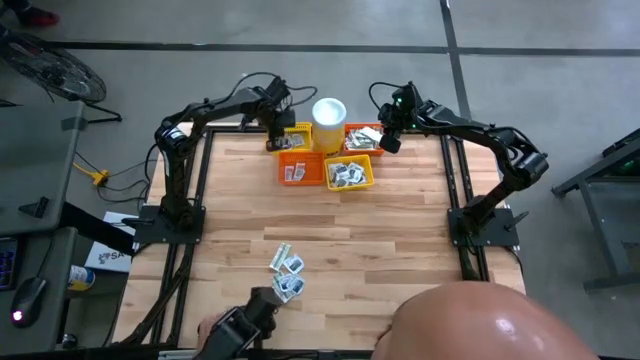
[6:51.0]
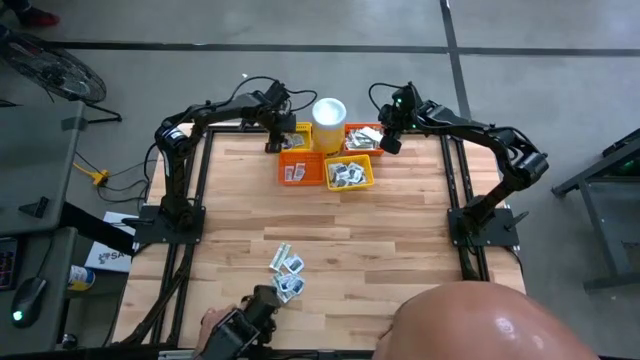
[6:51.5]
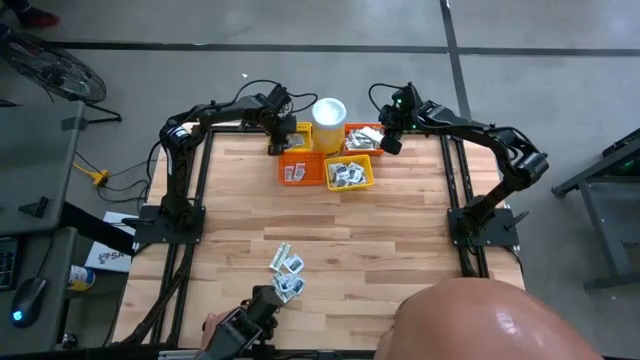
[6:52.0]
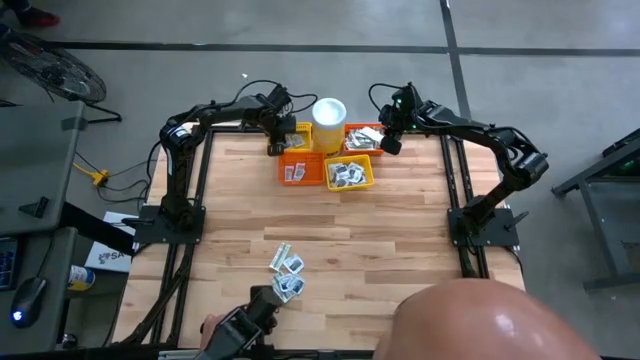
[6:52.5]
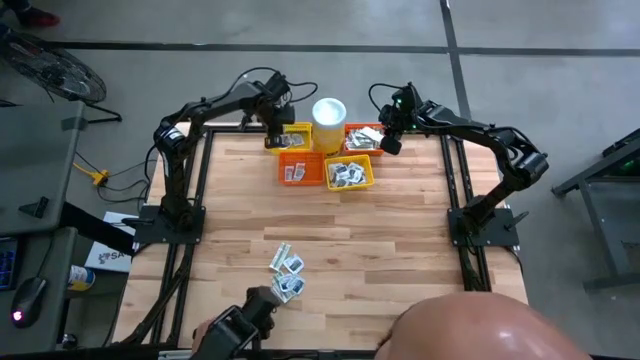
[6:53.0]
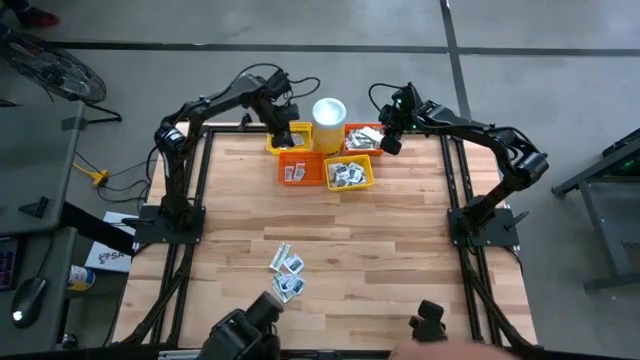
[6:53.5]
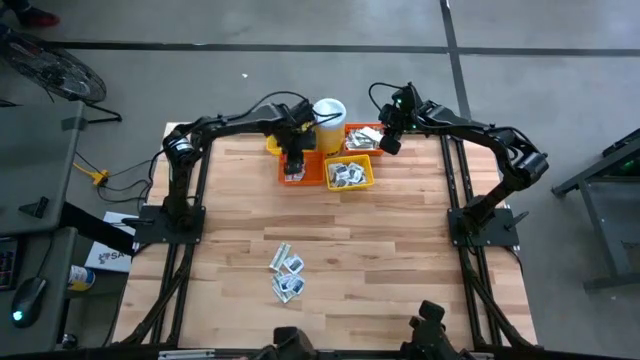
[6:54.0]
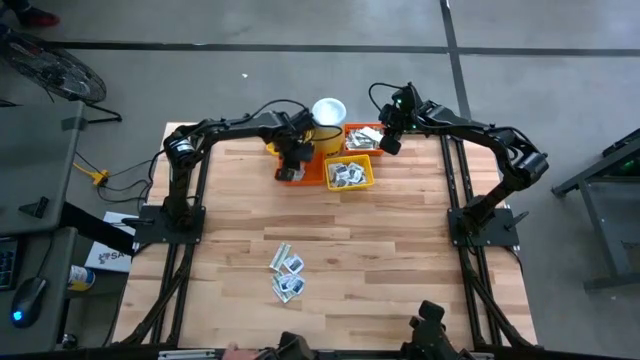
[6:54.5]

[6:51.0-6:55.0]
Task: Pick & Place First Aid Supplies
Put the orange ointment pack into the bottom orange basket

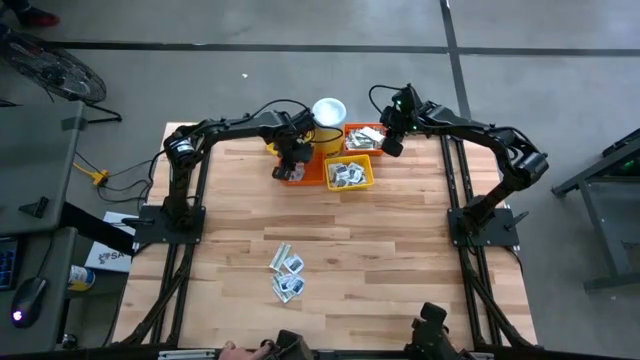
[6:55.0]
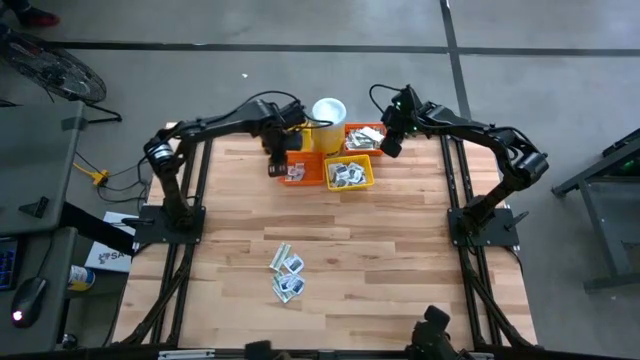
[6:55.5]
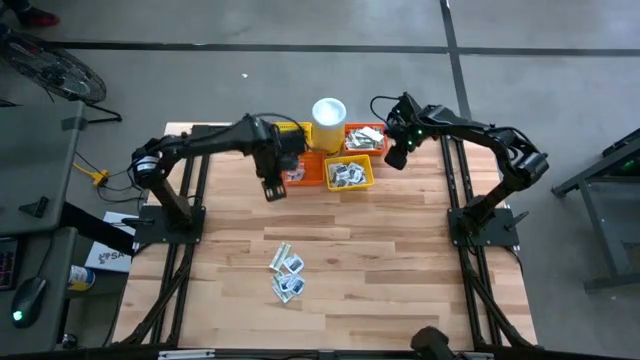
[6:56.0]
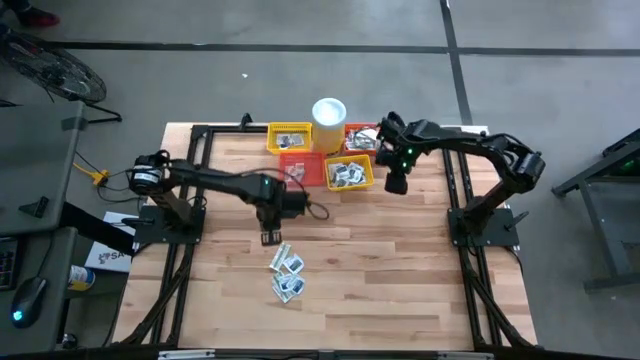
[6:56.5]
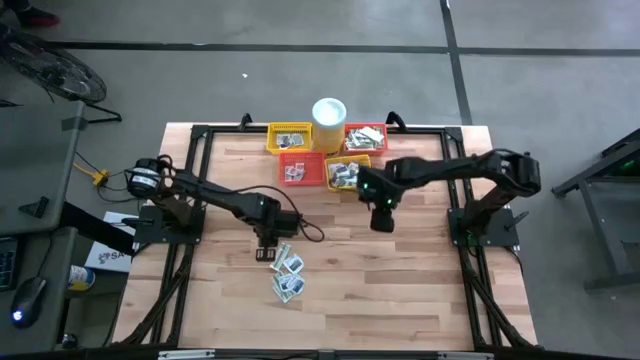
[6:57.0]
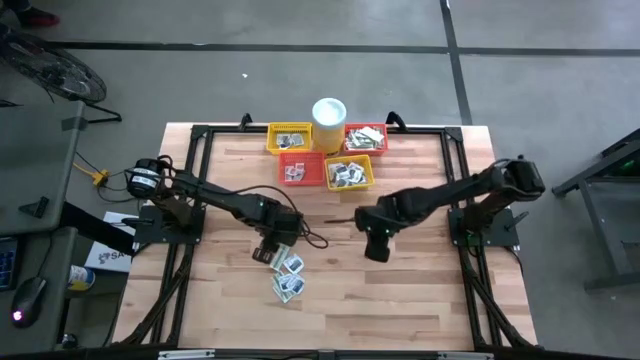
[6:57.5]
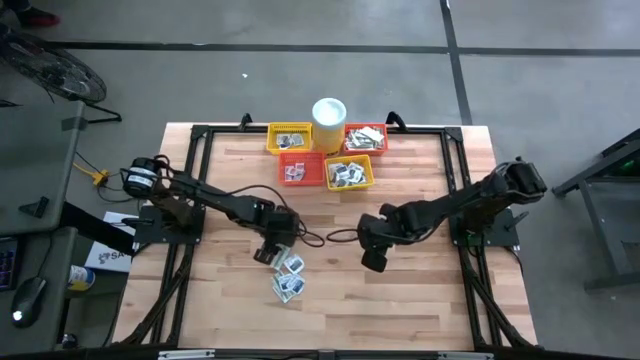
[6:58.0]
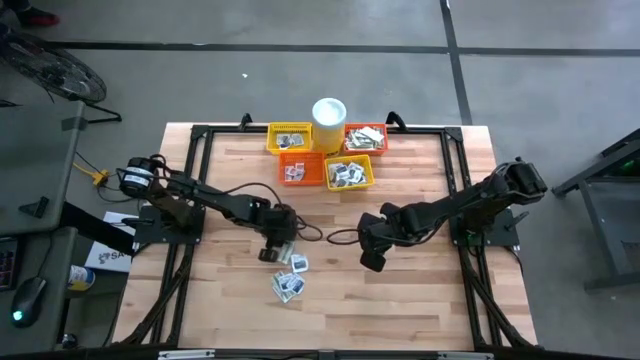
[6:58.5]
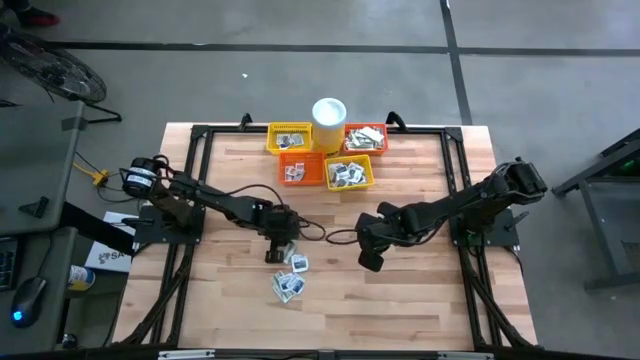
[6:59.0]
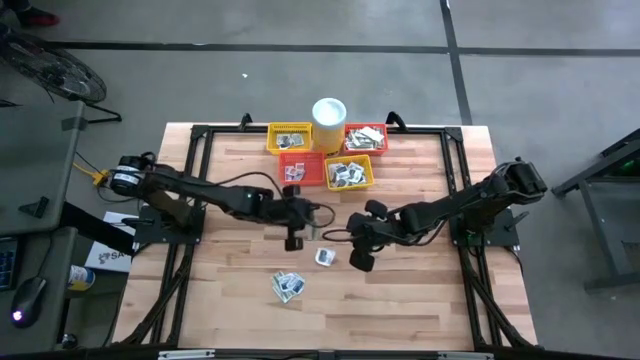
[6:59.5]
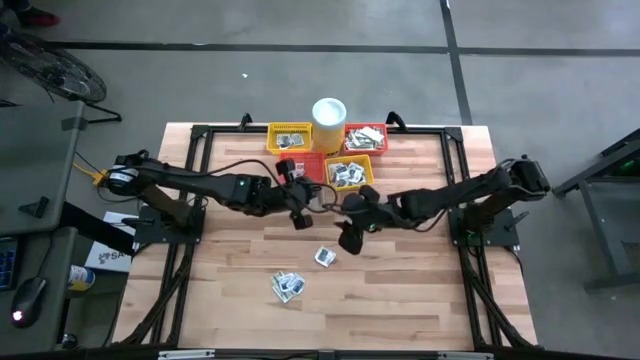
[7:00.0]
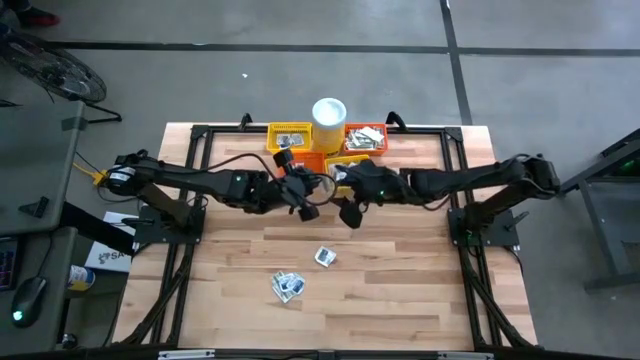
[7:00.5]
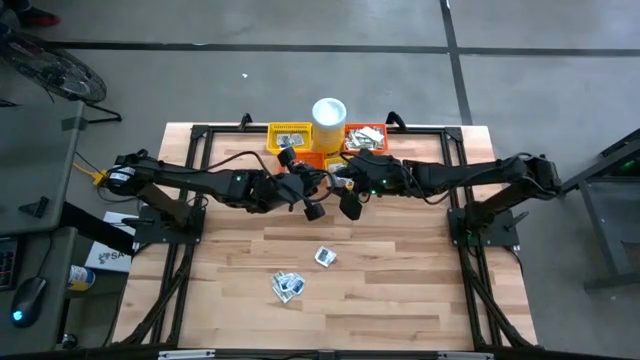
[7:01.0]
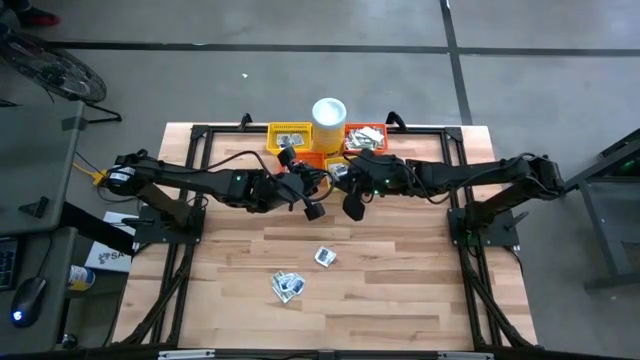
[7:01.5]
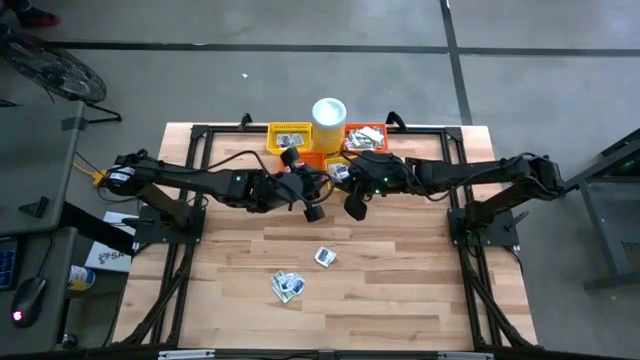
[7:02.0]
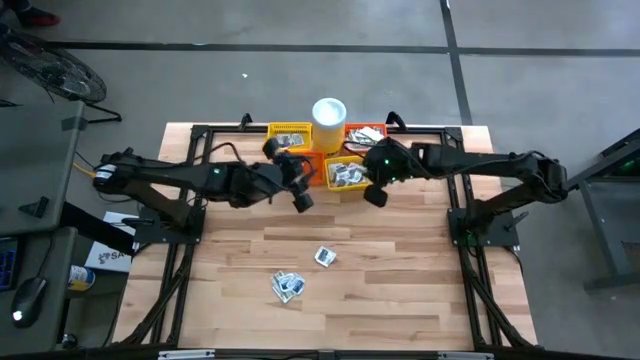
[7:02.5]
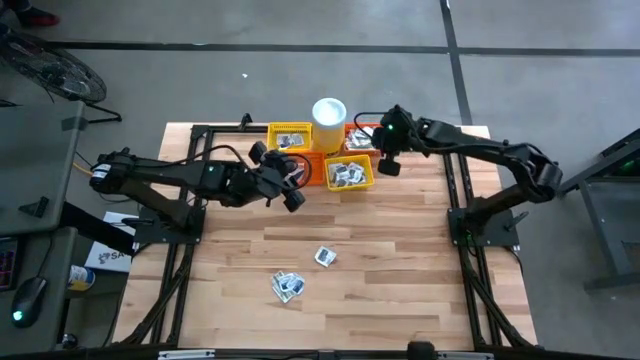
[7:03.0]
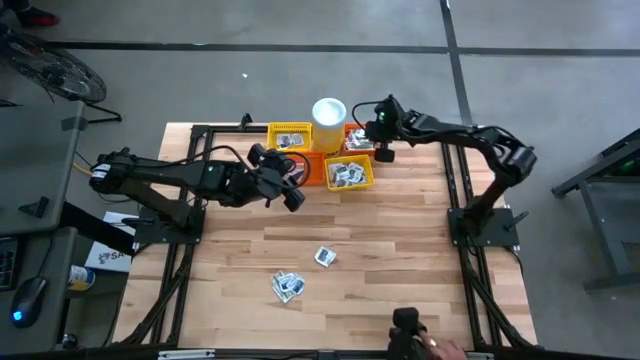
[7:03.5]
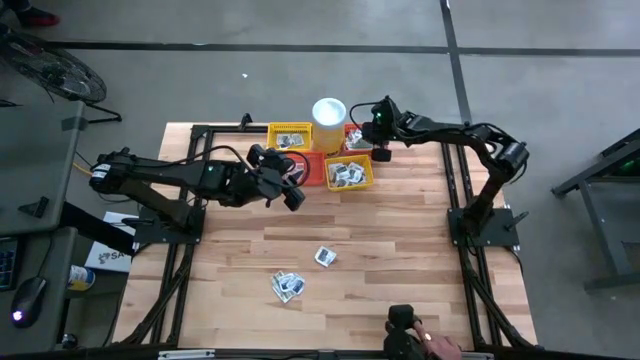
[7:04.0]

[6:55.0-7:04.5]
Put the green bandage pack into the top orange basket

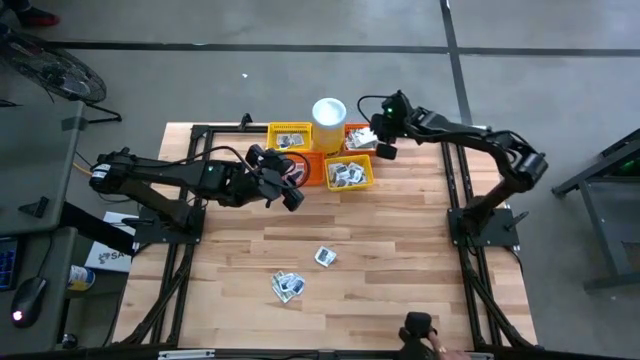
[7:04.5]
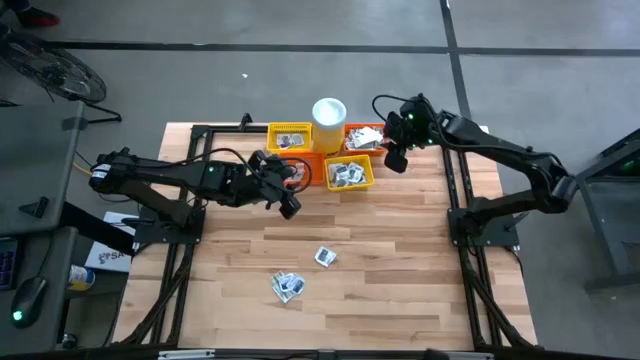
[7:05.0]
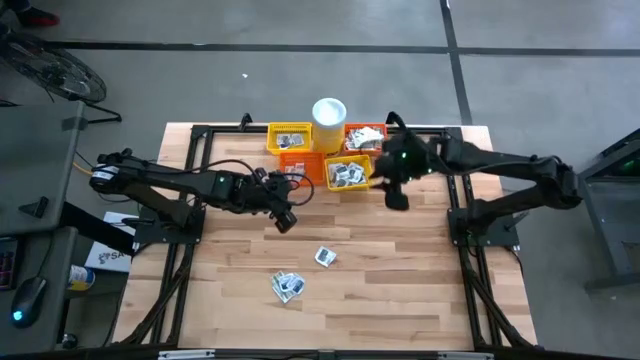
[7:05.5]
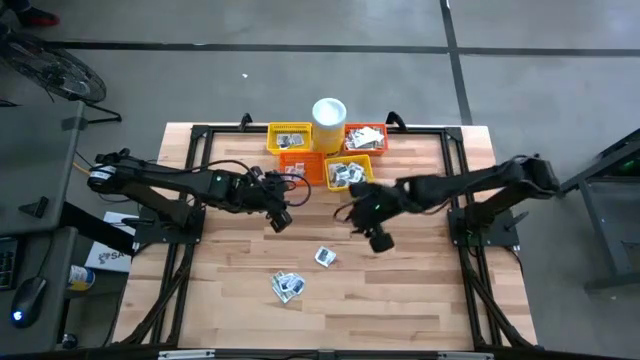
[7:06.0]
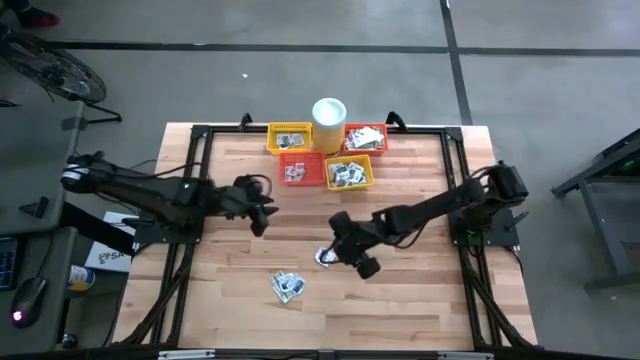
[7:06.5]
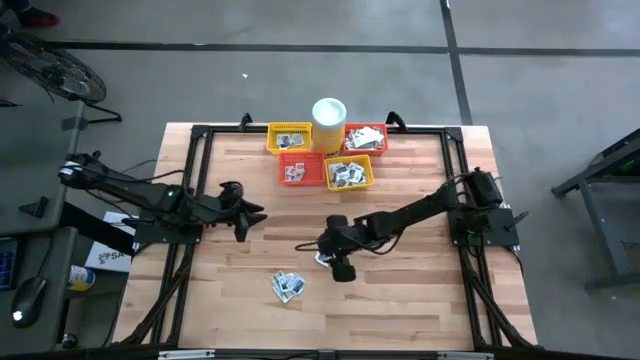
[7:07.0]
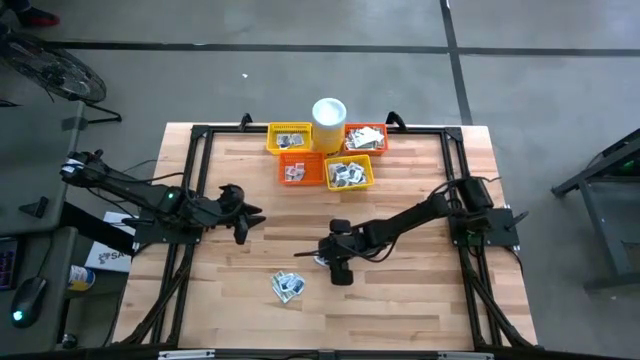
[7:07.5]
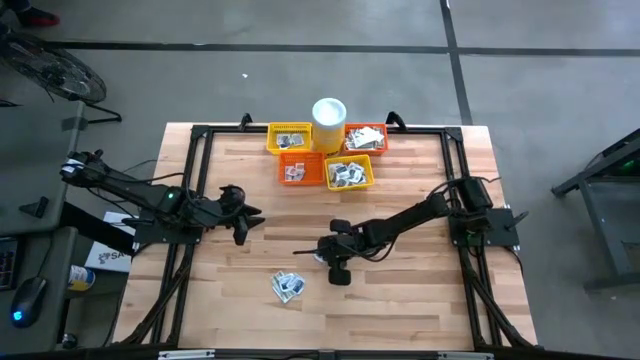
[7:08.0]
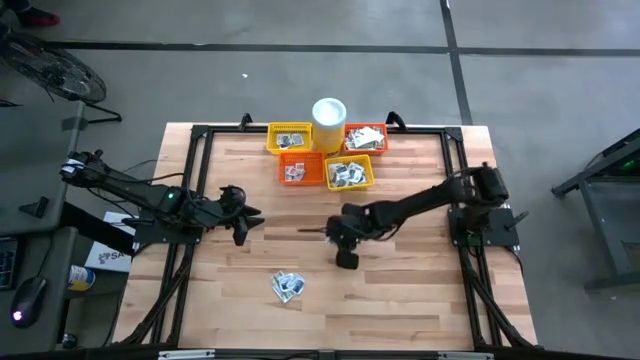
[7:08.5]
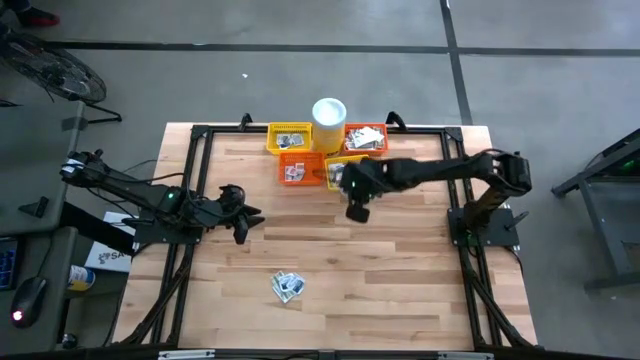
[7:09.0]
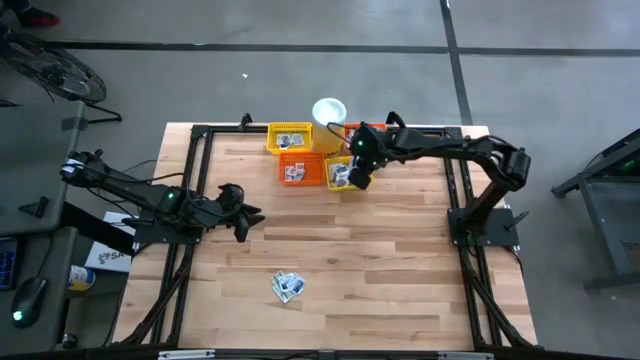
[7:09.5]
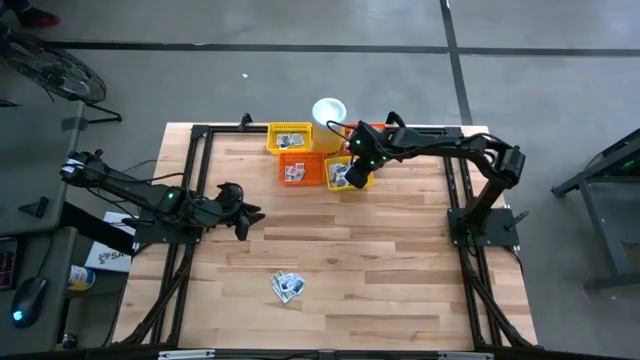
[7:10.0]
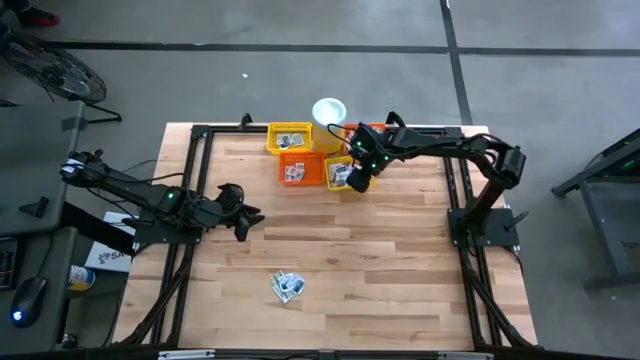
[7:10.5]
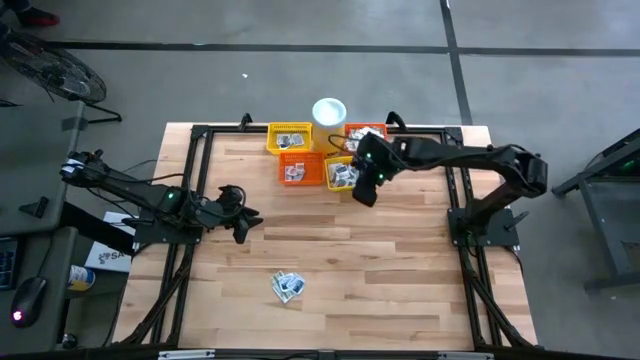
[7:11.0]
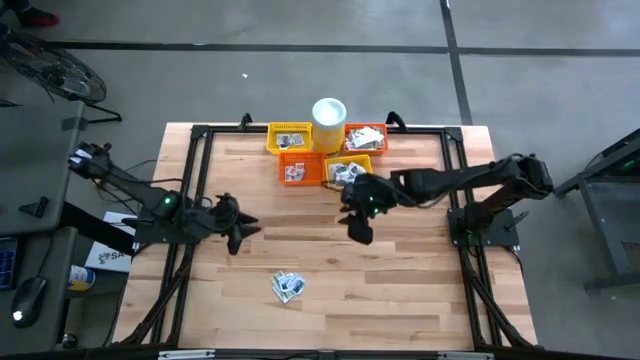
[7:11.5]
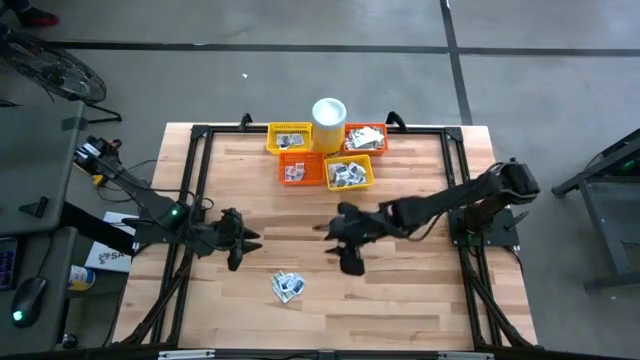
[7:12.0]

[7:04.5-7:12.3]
Put the black towelette pack into the bottom yellow basket
